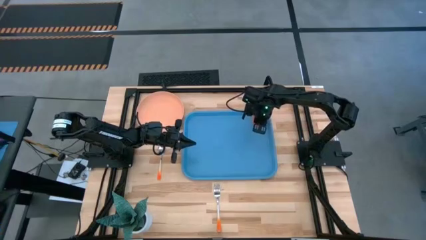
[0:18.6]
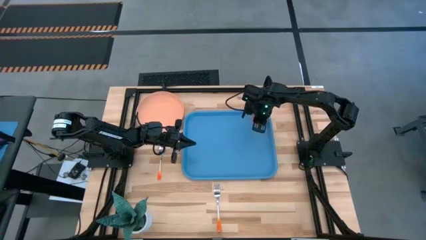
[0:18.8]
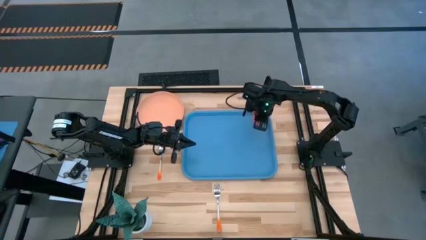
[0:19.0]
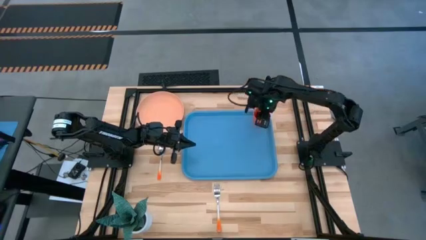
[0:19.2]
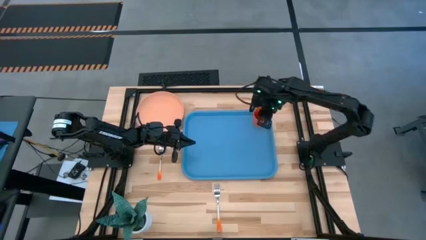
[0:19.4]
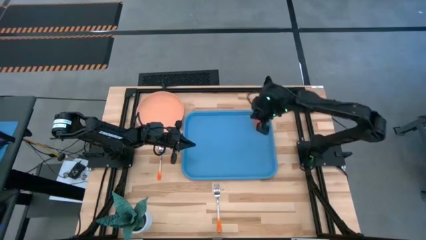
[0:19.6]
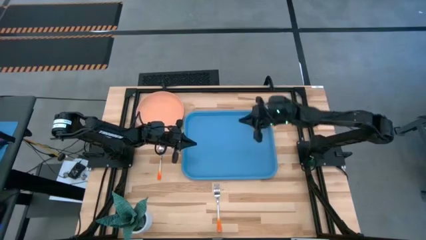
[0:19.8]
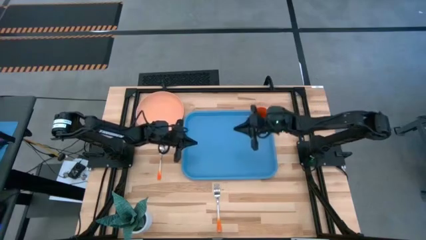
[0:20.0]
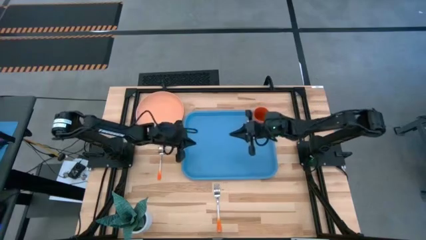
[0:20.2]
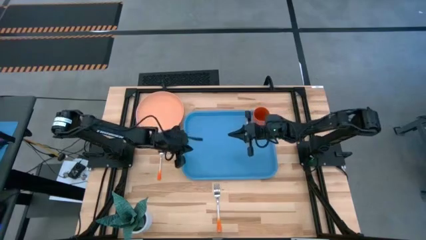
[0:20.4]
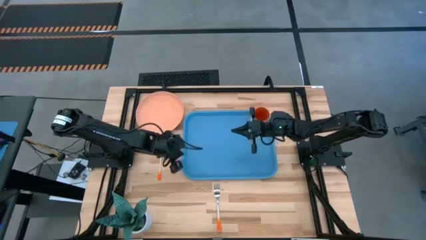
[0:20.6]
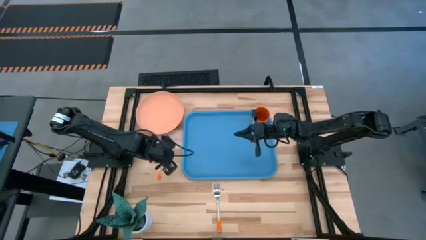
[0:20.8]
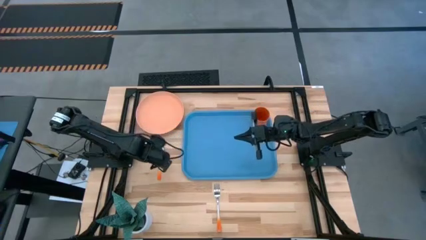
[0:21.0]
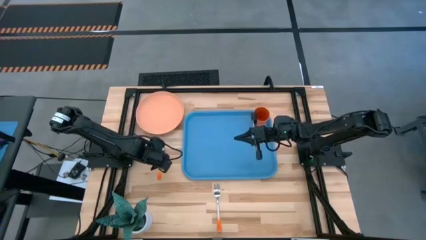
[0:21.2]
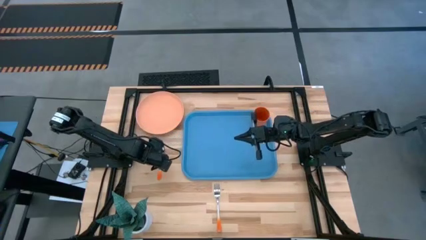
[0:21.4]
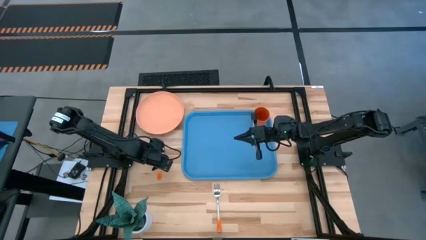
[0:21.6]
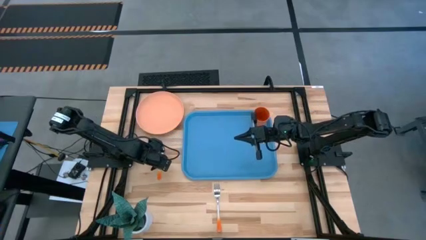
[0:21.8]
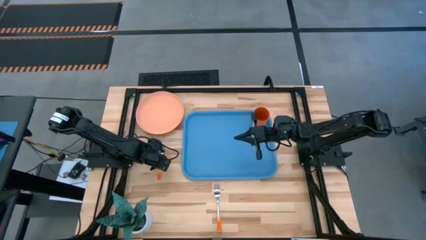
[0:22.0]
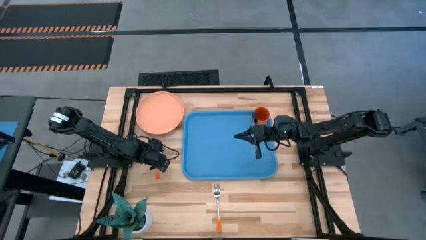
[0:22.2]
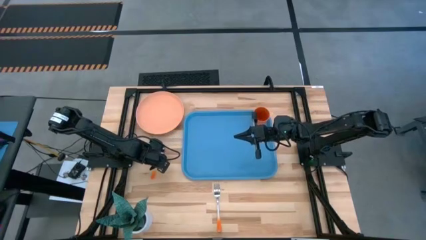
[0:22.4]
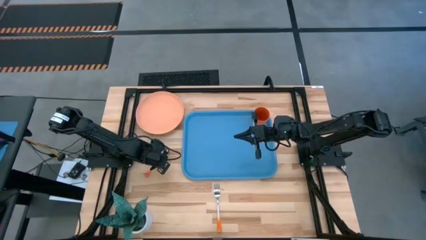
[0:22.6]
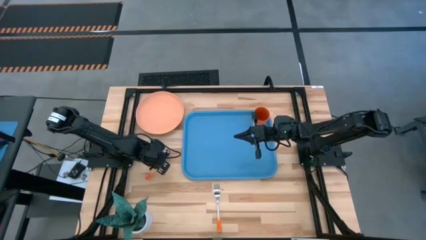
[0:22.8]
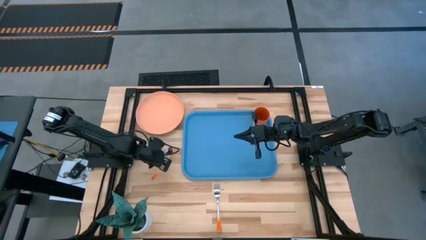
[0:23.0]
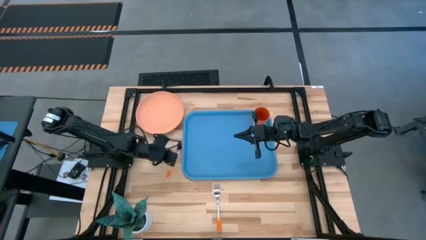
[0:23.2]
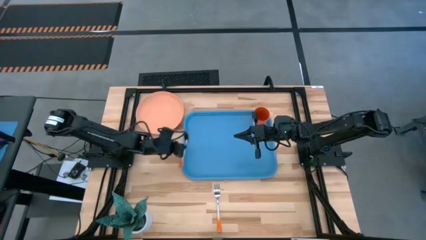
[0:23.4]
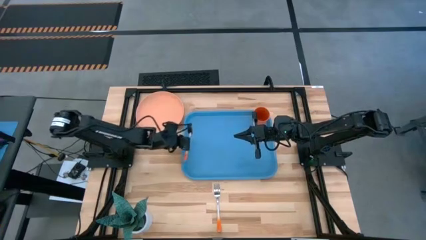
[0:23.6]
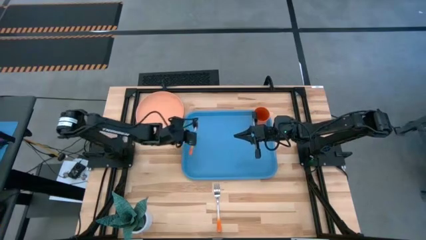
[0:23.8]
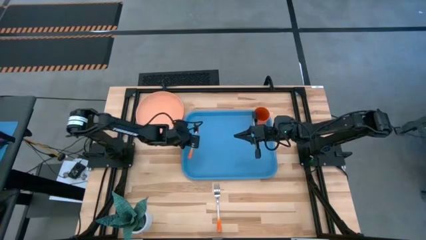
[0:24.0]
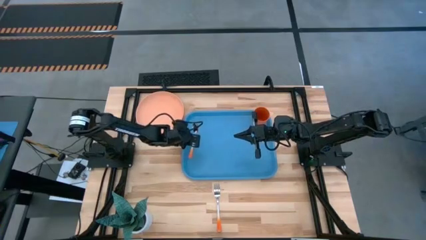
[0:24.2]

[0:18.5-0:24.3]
Task: Pick and place plate/cup/fork/spoon on tray
Put the orange spoon on the left blue tray to the bottom left of the orange cup

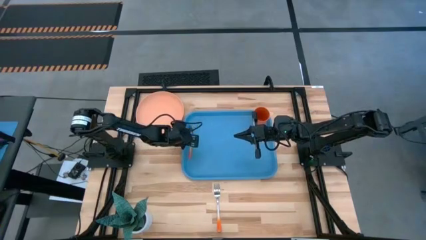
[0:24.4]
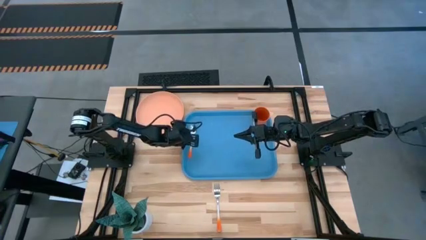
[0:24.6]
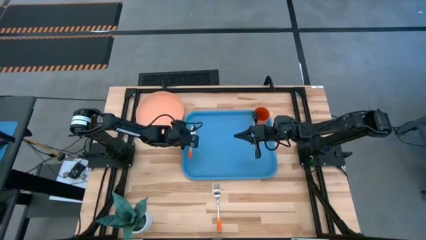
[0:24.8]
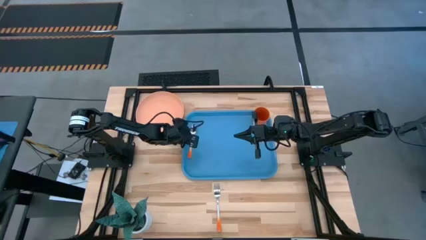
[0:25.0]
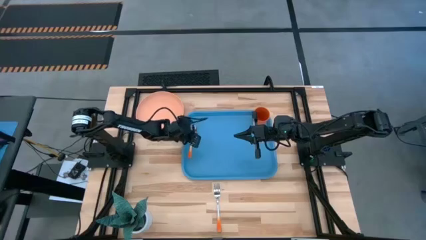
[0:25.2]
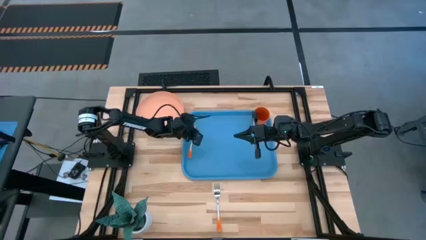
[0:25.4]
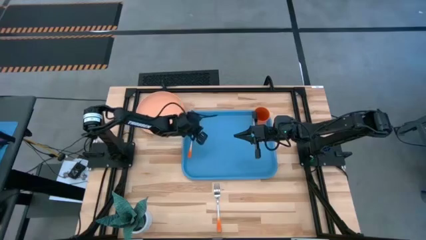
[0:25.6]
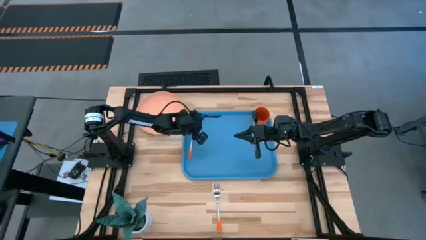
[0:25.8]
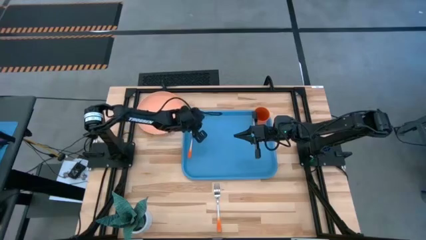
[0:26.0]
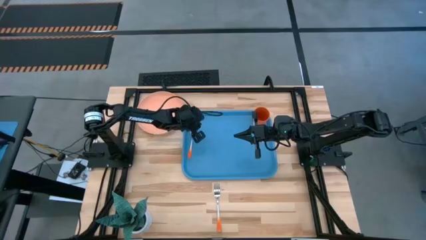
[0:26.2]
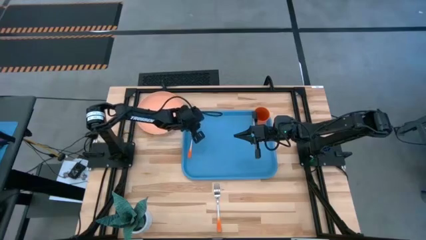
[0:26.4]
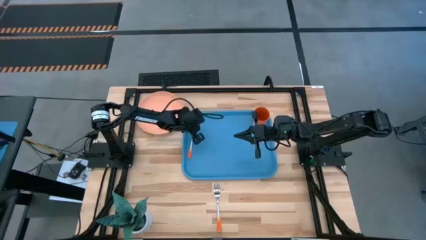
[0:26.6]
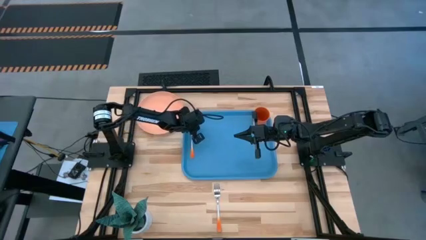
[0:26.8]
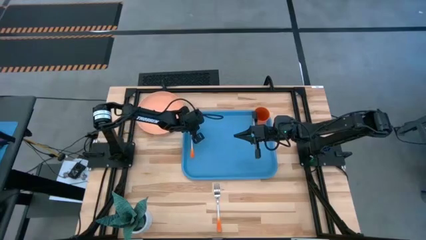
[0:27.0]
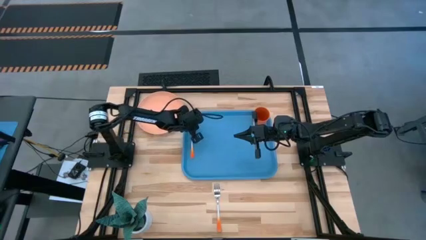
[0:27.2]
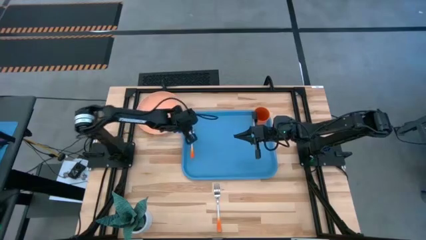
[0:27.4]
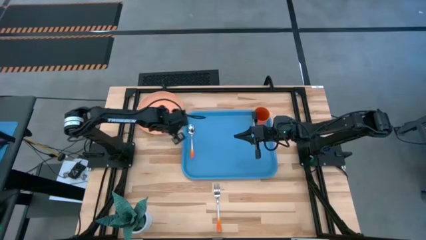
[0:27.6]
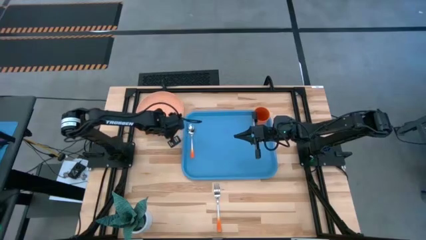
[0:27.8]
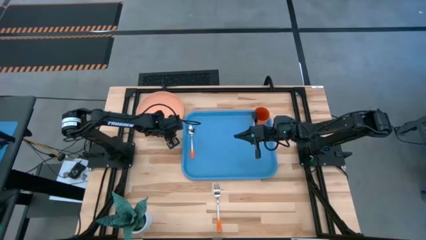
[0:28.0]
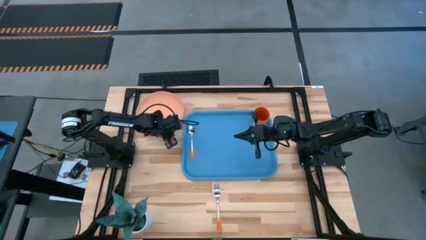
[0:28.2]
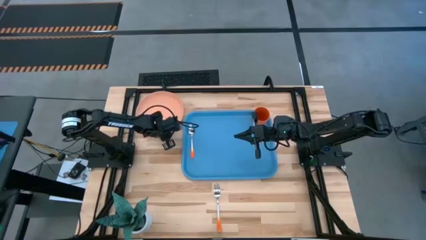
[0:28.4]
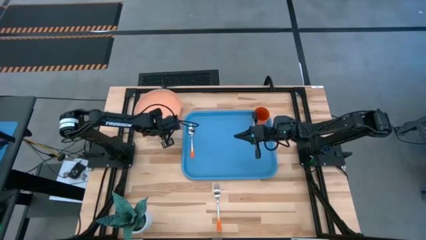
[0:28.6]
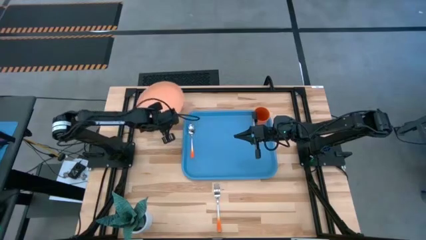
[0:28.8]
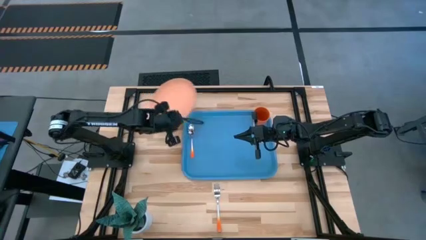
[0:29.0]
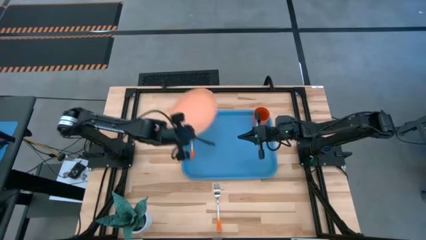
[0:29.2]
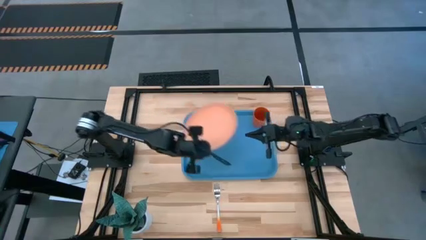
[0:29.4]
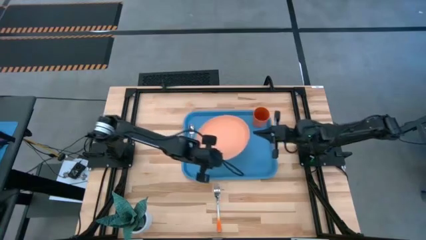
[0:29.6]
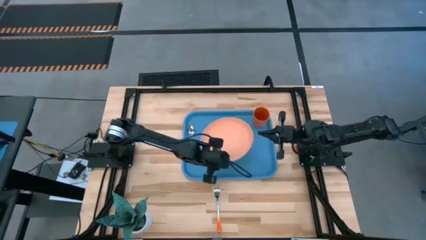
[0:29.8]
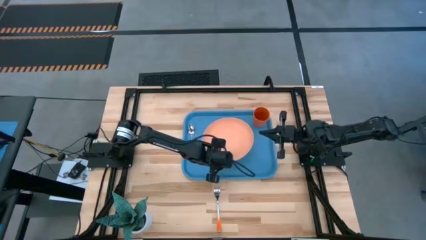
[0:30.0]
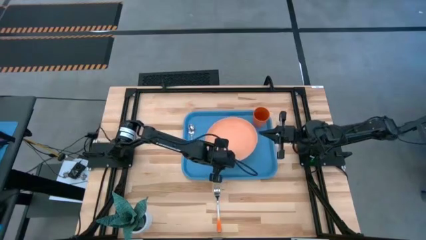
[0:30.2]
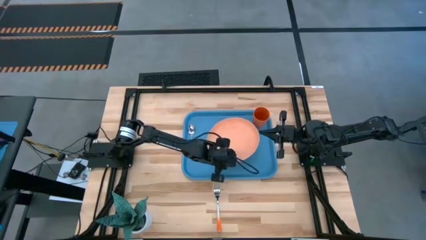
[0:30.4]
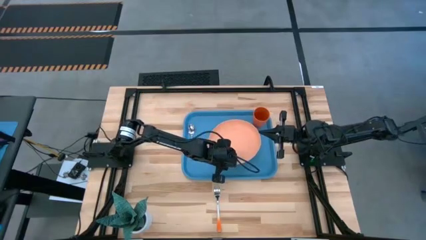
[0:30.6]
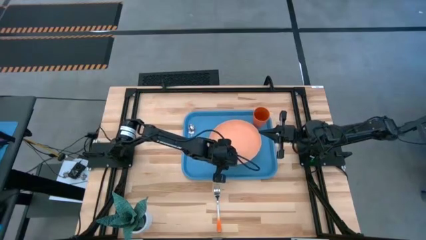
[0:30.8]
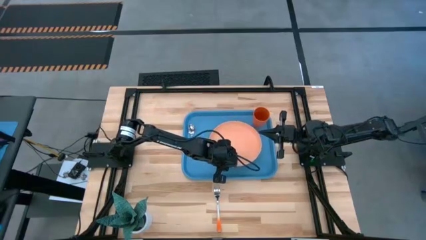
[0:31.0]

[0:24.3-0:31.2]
Put the light orange plate on blue tray to the right of the orange spoon

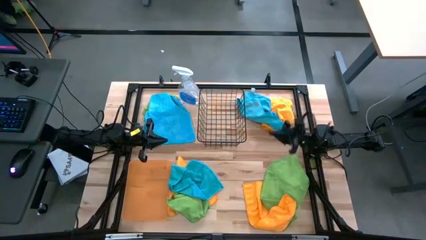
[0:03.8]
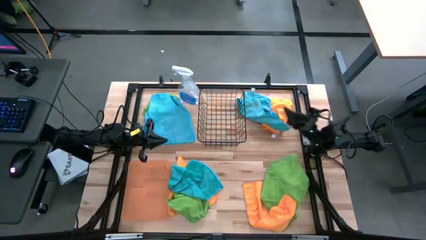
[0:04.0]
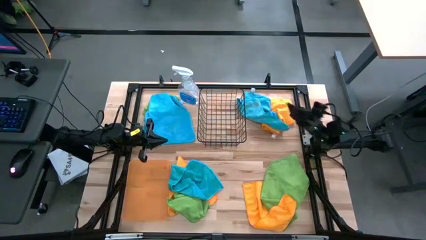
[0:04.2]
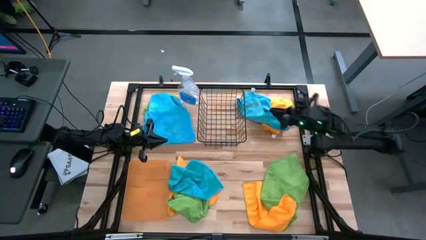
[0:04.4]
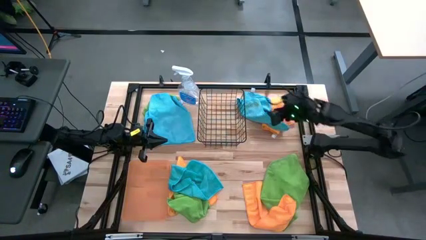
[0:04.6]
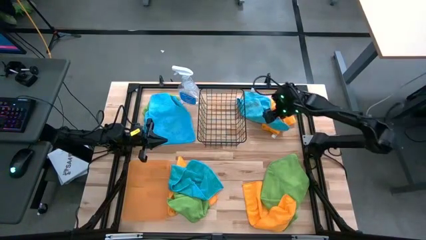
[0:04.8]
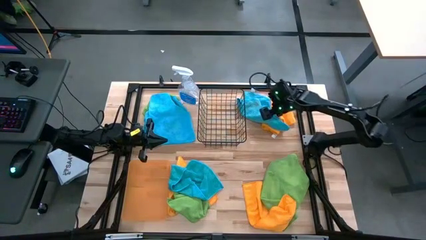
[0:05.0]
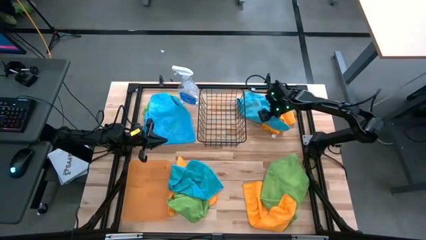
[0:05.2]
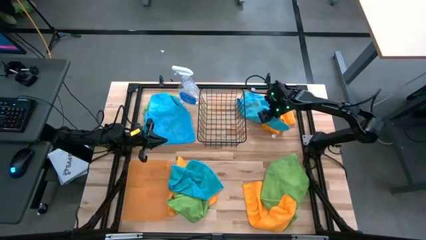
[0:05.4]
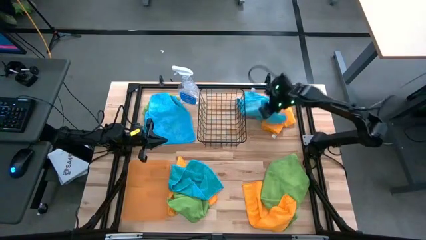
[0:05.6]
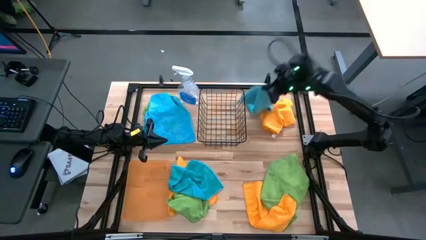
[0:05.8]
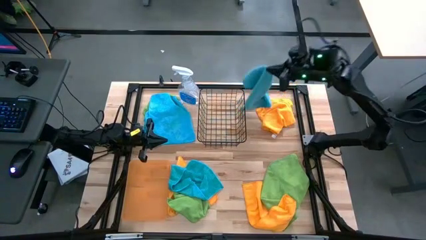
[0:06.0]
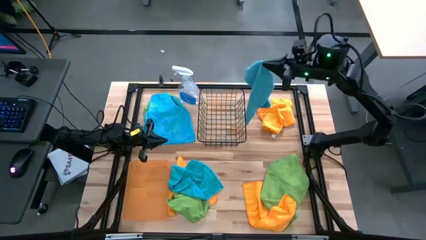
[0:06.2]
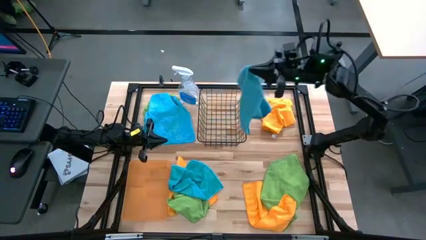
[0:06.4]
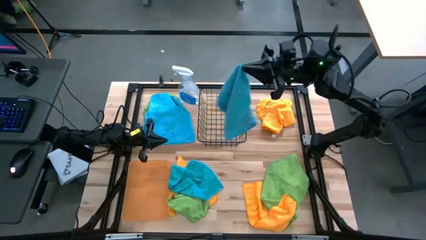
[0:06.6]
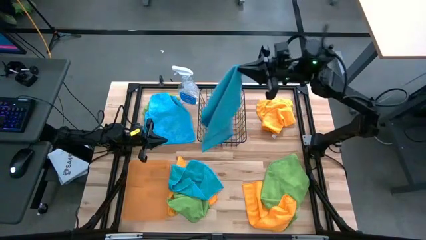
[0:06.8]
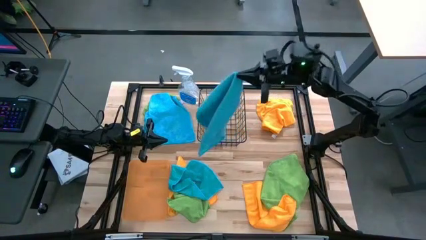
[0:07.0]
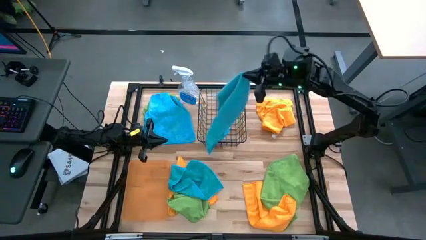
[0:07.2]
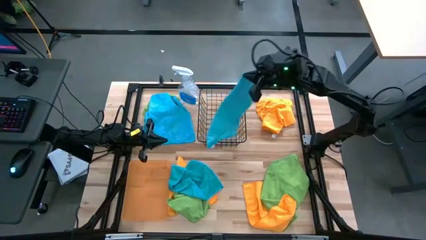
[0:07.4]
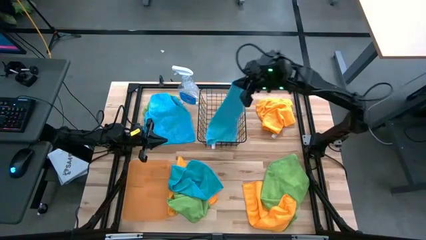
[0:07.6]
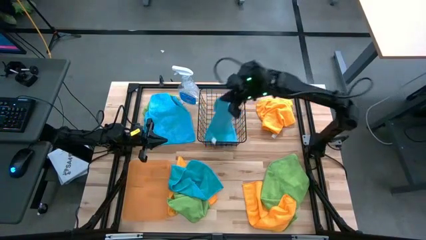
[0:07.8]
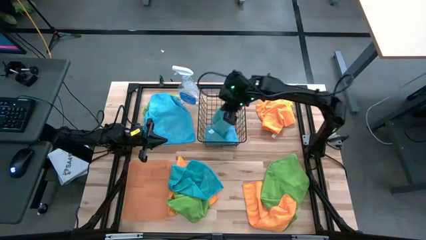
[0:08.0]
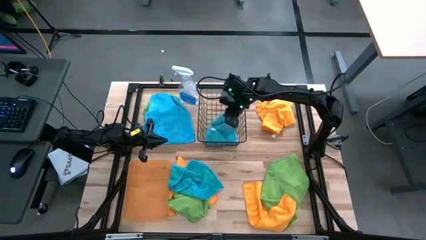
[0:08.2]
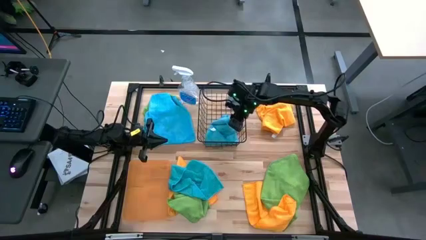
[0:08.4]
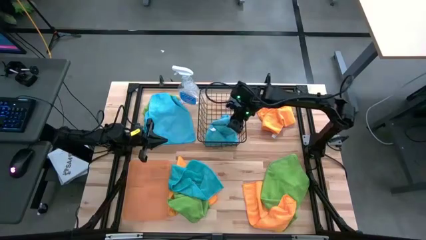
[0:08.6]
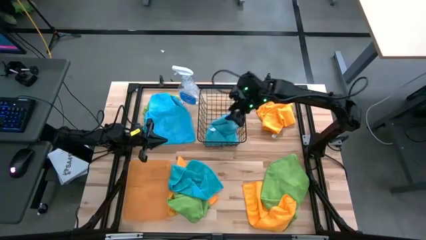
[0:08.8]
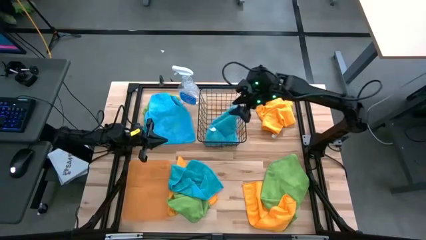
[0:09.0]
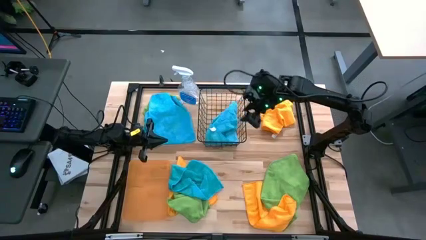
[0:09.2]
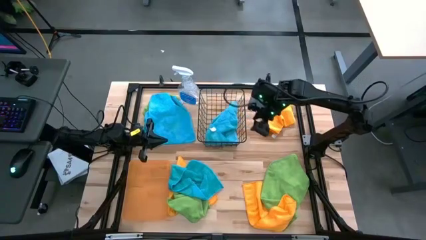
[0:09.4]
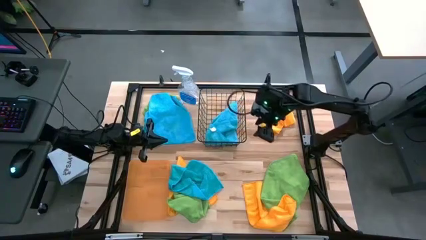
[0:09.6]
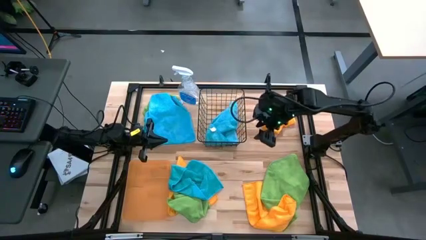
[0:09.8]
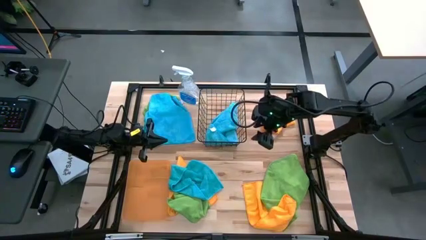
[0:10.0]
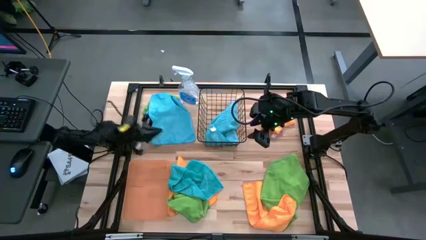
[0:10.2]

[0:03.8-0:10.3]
Task: Sort microfiber towel by color & place in baskets
Put the top right blue towel into the black basket
